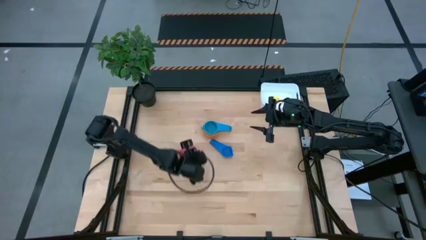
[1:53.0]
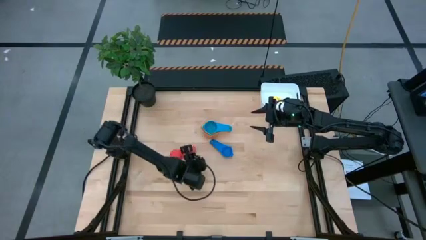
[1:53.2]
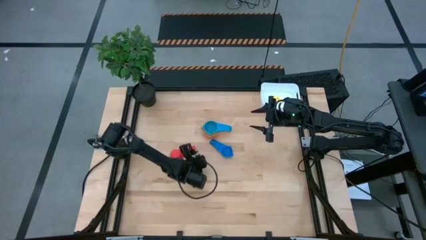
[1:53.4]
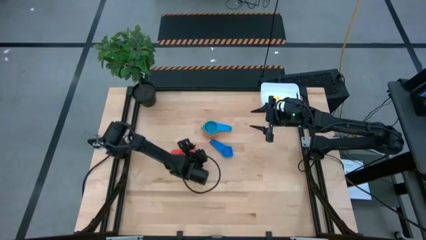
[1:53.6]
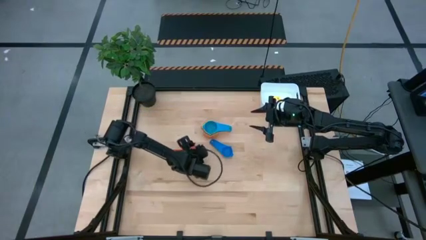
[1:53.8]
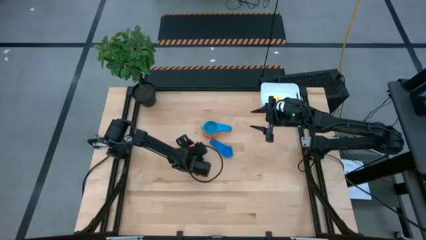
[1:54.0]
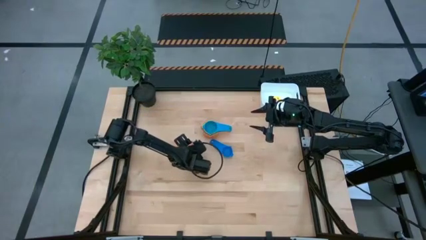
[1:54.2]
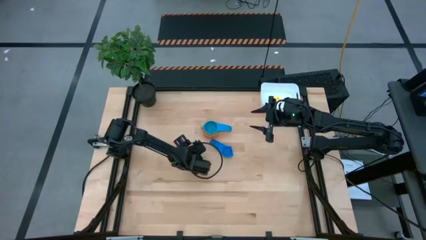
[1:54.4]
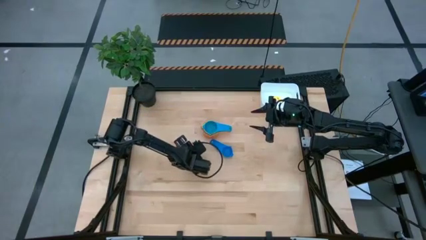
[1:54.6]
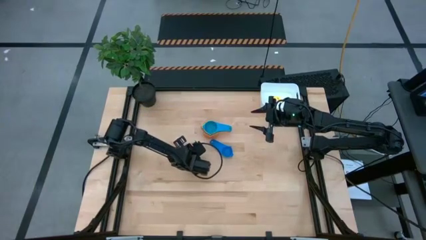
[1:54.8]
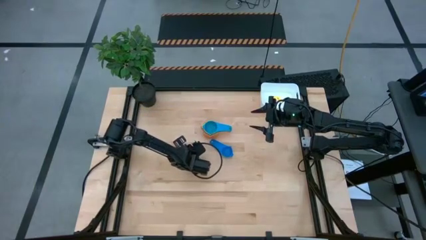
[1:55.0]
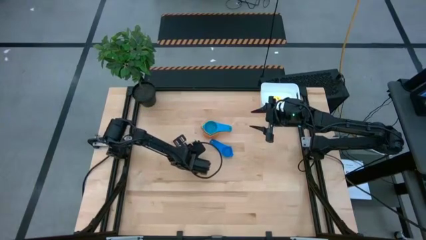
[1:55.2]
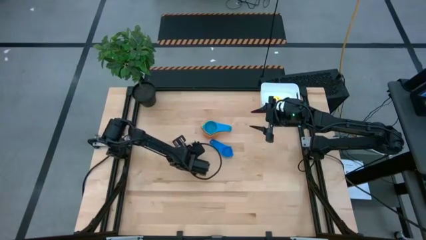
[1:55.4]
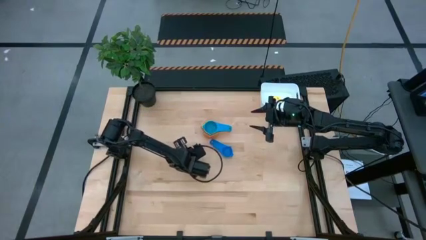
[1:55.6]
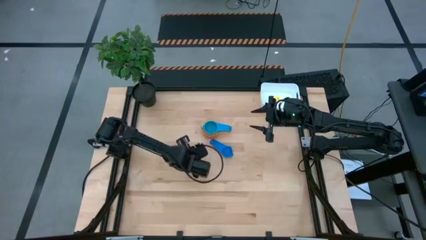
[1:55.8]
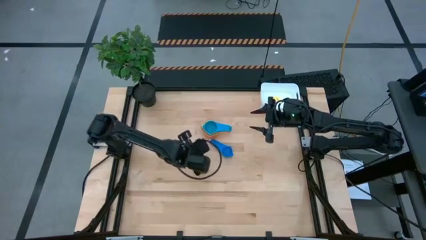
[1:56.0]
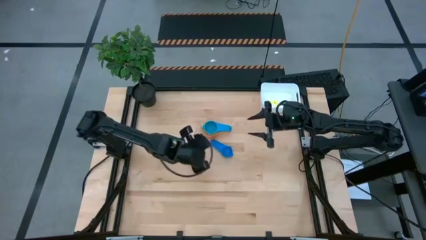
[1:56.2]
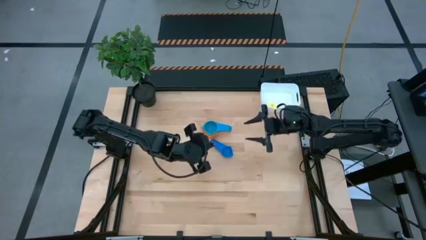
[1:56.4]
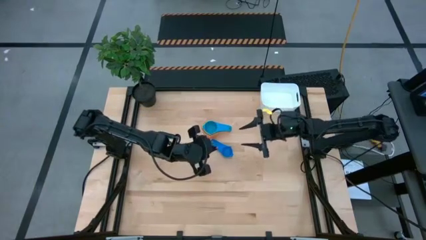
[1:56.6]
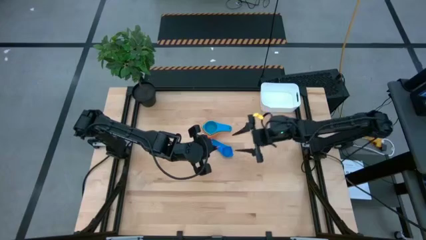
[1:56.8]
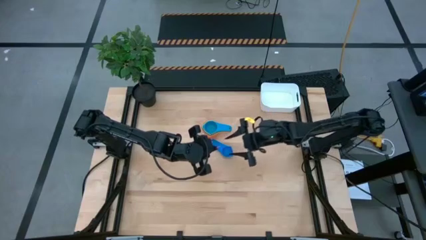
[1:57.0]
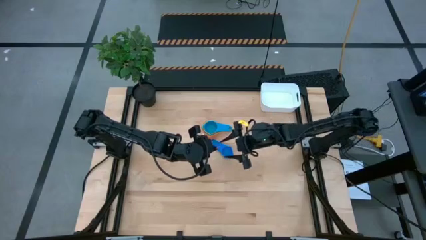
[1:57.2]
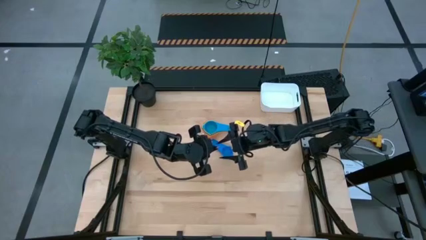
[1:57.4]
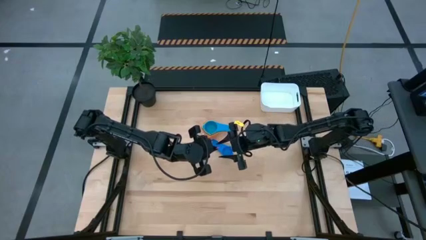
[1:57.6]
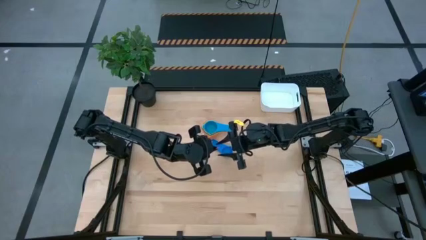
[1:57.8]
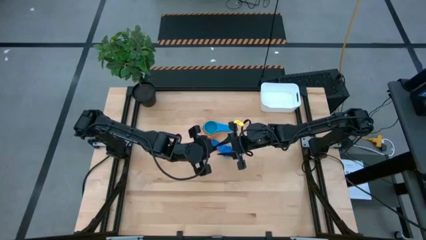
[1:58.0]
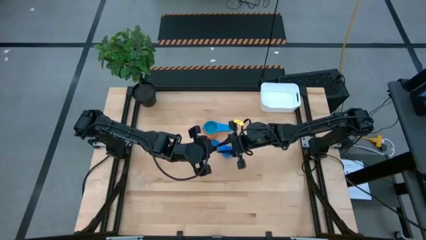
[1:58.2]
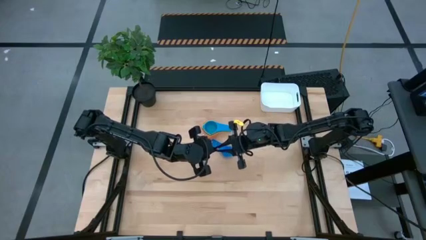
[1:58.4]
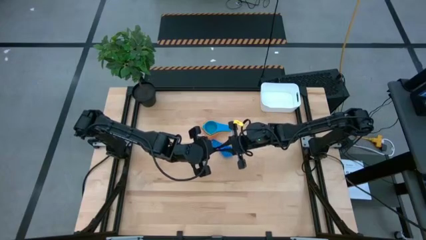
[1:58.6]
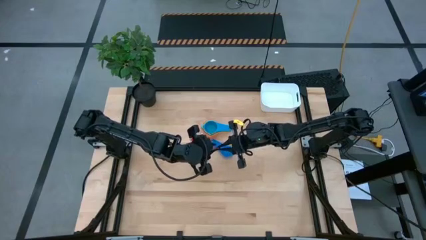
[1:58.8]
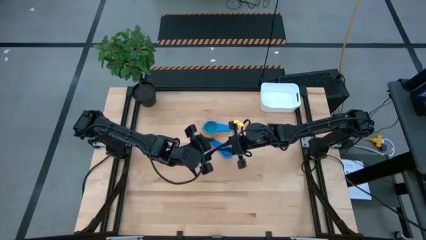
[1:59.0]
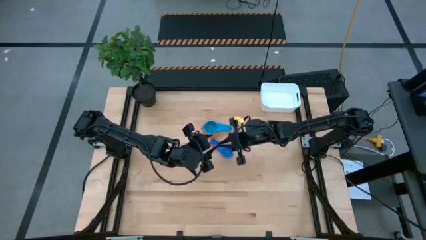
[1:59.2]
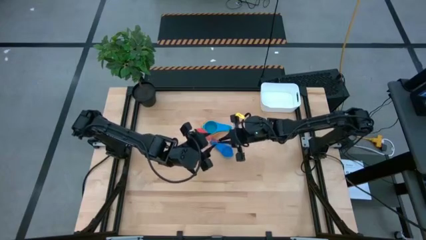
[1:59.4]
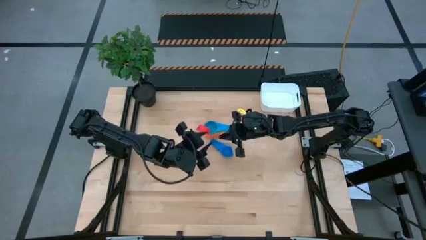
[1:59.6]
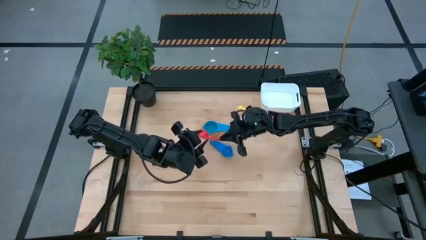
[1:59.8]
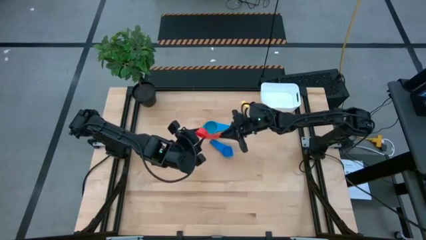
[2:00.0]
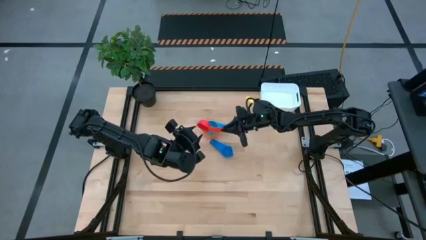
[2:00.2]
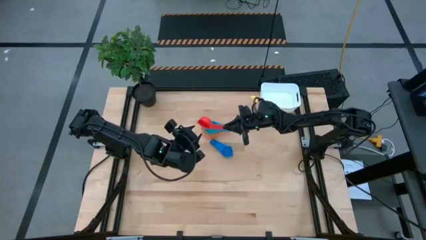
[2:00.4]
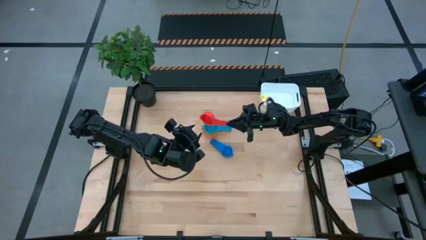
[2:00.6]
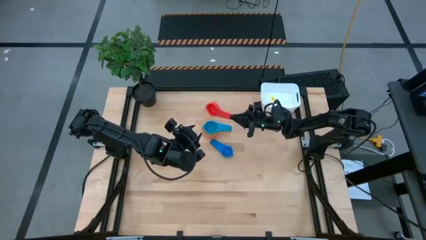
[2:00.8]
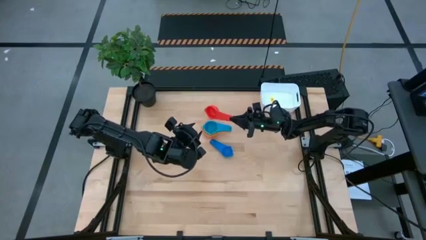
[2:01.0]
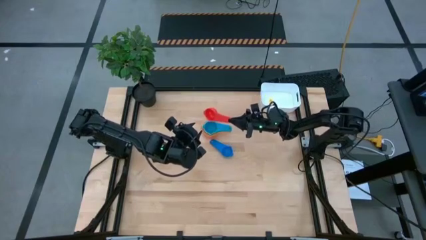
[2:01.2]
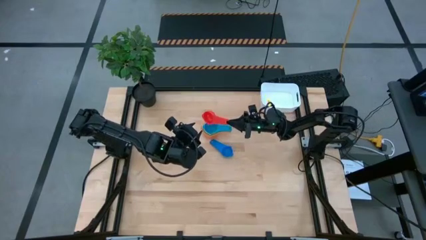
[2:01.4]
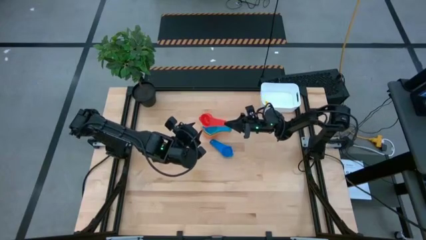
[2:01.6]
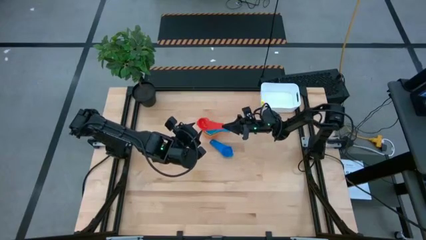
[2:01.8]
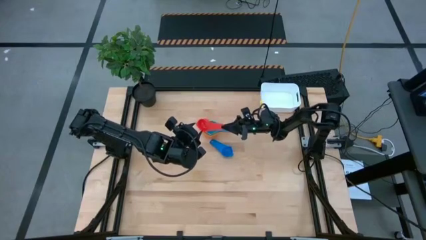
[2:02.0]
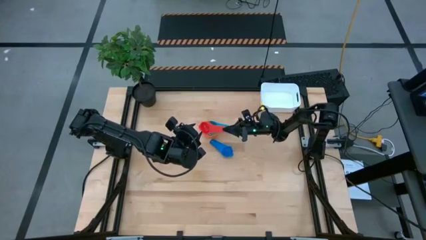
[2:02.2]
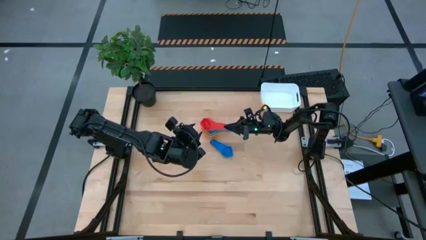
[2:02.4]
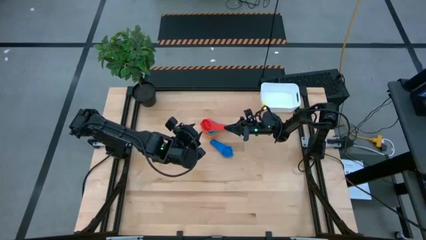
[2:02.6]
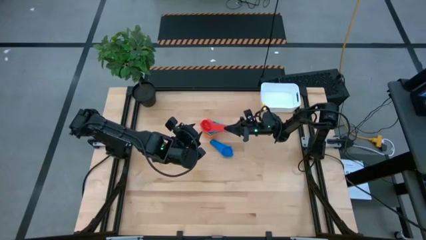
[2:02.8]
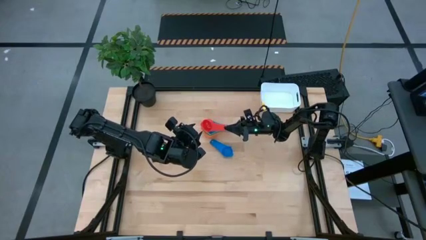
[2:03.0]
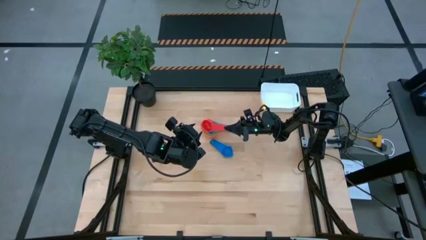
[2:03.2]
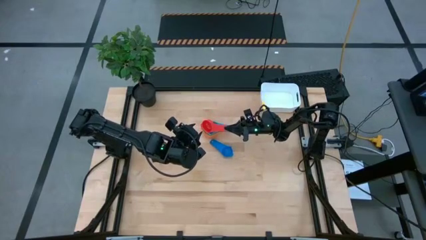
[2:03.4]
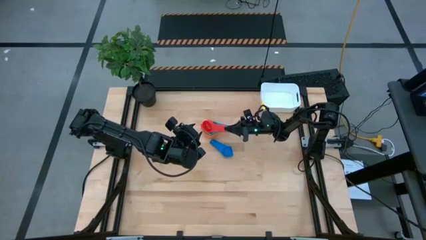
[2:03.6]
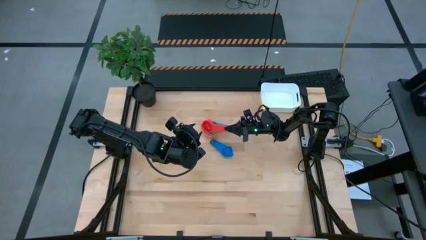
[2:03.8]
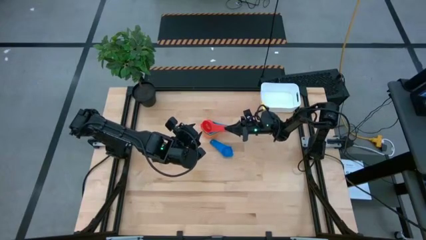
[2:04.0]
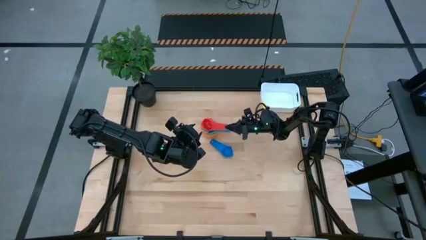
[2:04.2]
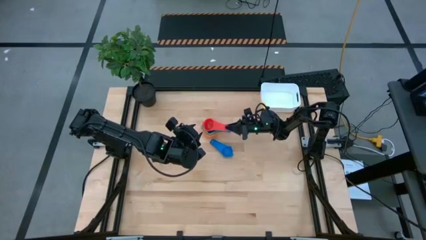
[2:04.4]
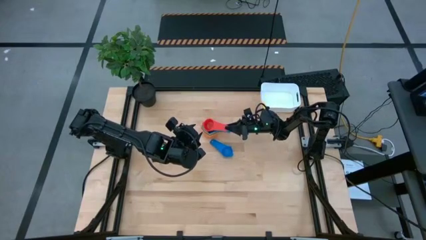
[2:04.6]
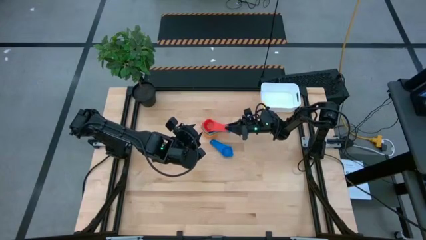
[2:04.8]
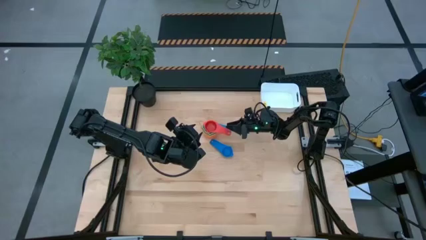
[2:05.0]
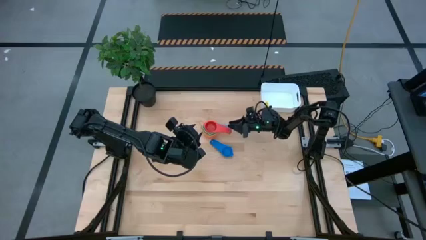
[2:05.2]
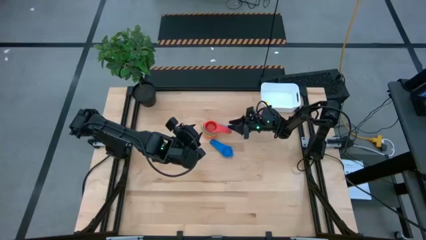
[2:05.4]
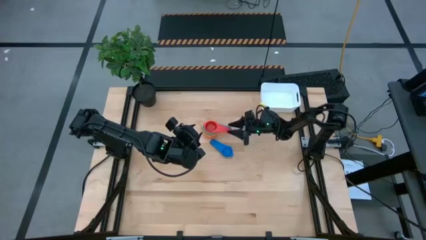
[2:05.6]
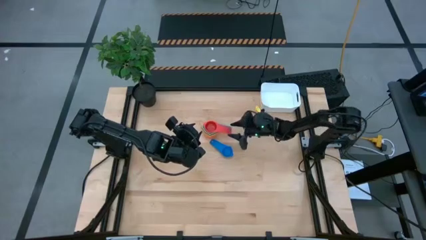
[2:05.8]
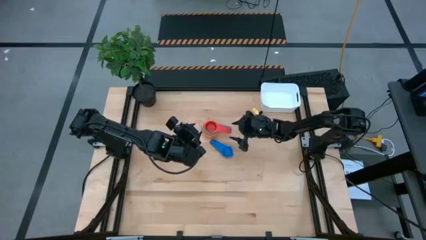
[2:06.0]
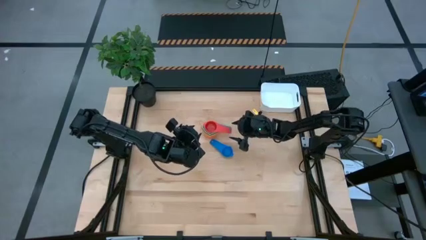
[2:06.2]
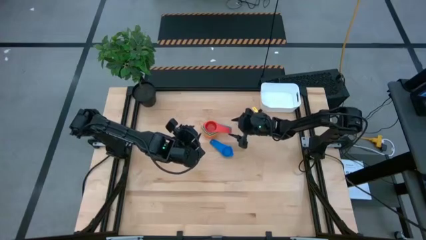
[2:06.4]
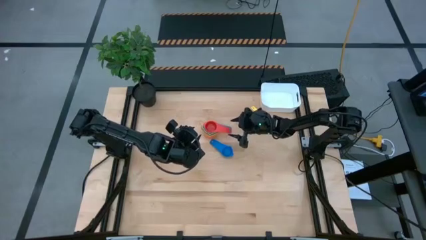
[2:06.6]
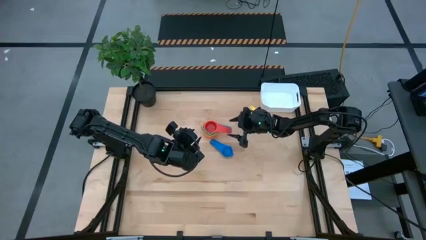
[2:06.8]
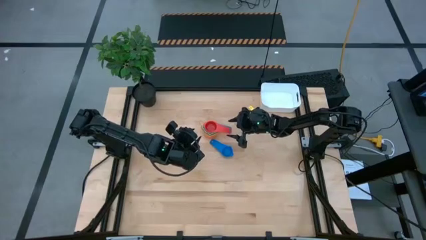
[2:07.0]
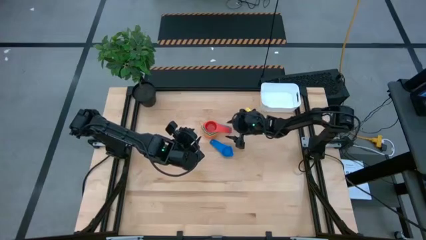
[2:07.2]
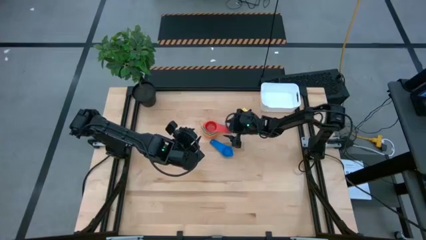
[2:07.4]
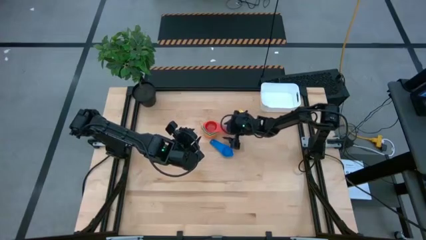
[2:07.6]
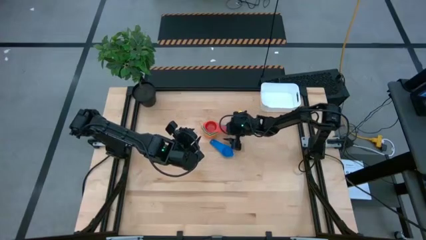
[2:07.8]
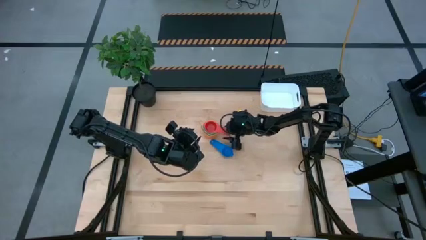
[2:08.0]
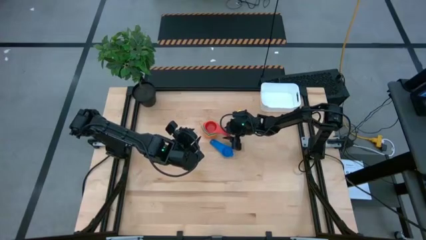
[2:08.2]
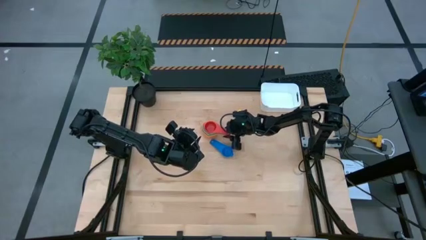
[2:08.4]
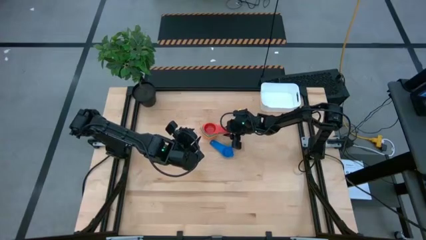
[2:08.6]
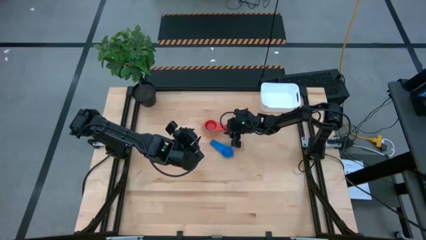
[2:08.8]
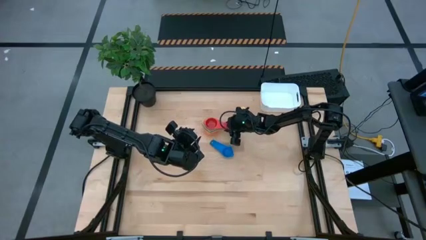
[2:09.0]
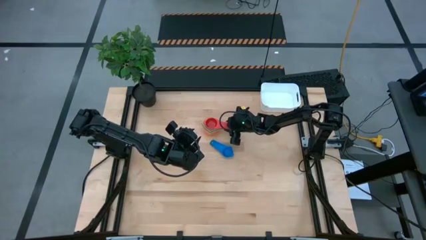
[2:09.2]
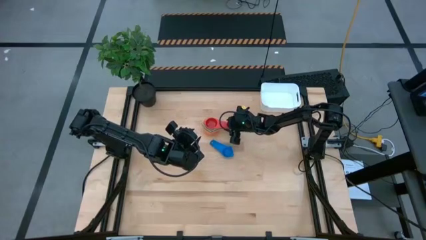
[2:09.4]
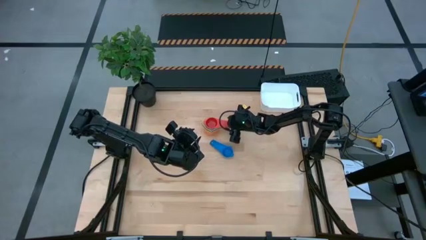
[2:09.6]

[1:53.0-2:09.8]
Task: Nest measuring cups in basket
Stack the red measuring cup into the light blue measuring cup
